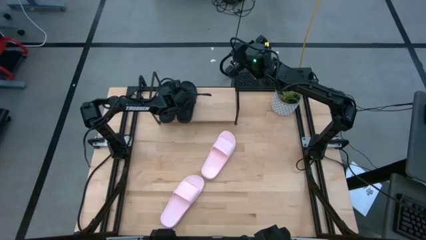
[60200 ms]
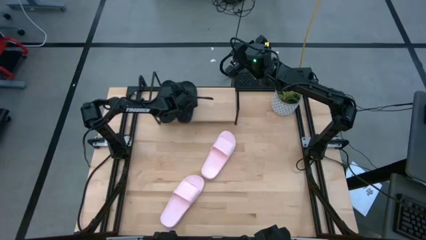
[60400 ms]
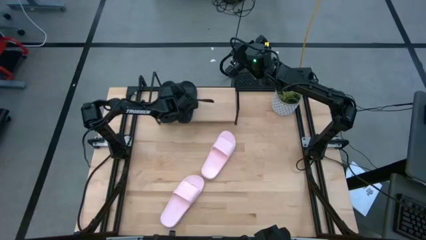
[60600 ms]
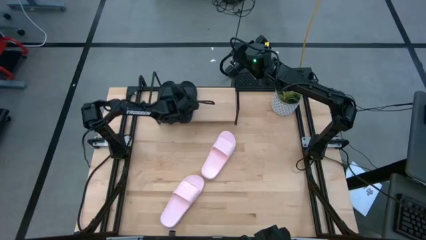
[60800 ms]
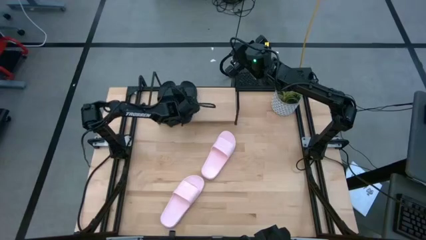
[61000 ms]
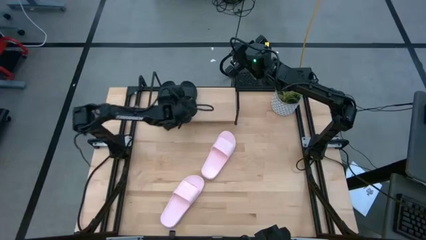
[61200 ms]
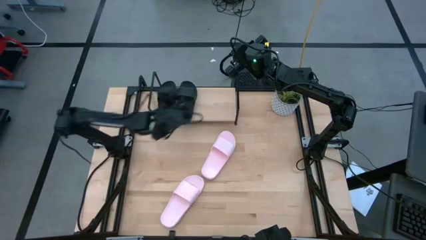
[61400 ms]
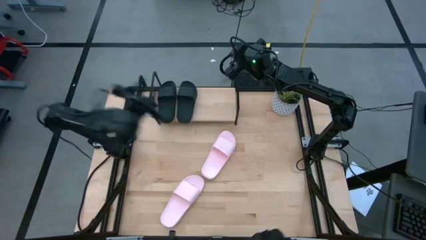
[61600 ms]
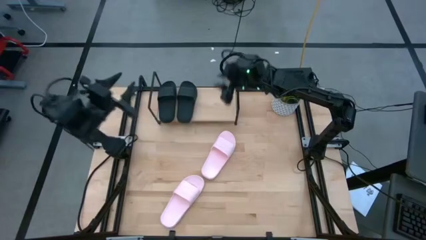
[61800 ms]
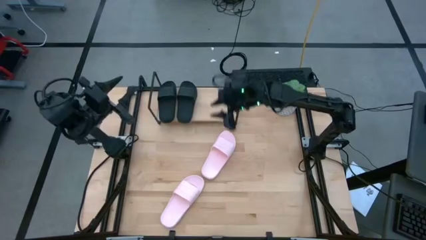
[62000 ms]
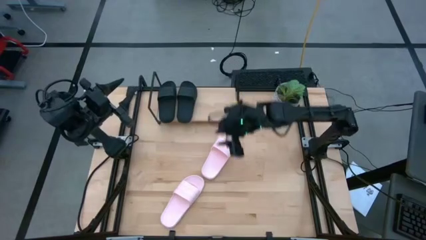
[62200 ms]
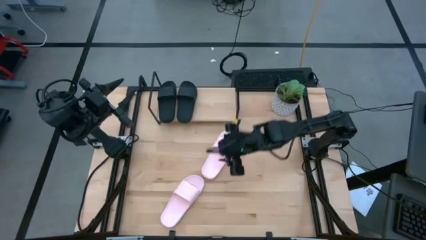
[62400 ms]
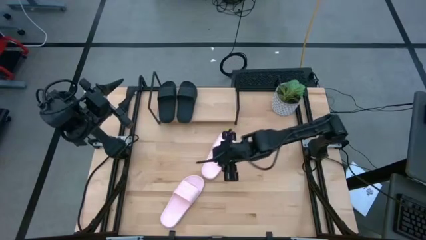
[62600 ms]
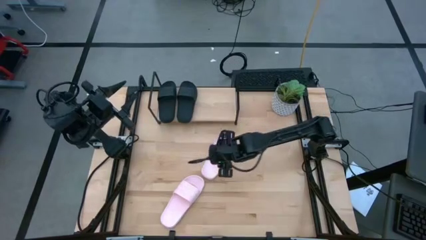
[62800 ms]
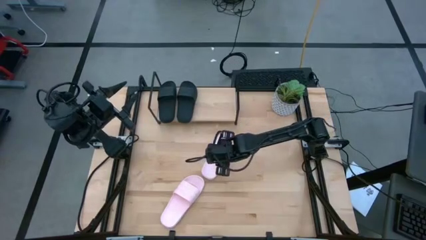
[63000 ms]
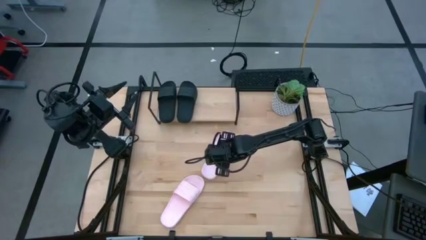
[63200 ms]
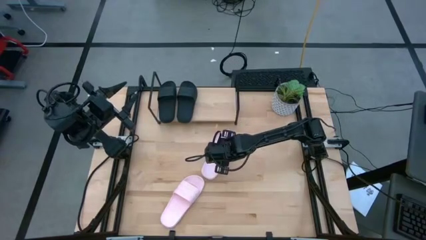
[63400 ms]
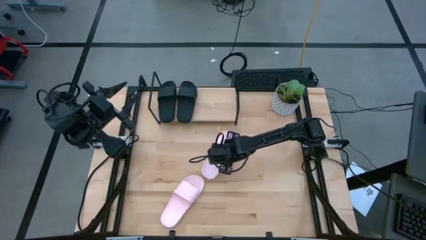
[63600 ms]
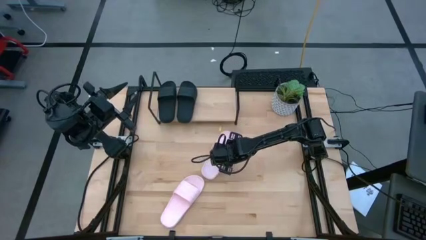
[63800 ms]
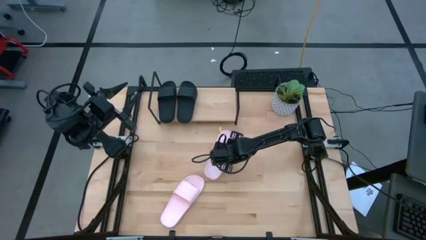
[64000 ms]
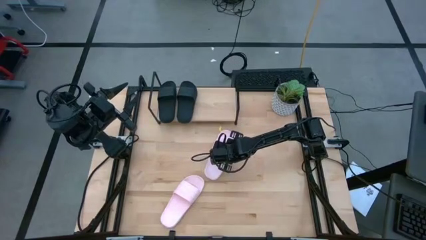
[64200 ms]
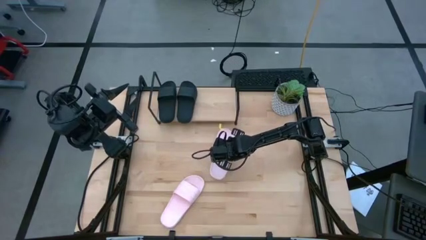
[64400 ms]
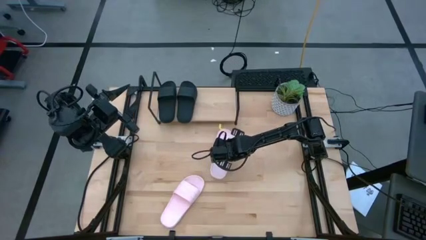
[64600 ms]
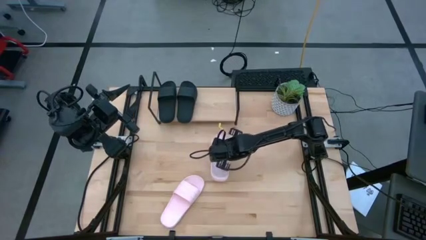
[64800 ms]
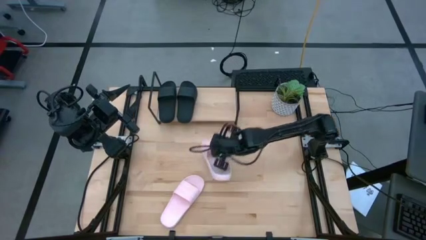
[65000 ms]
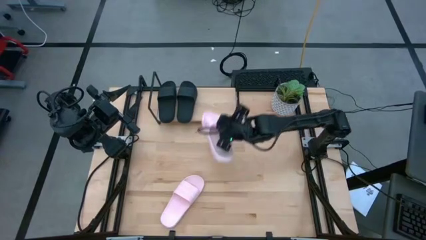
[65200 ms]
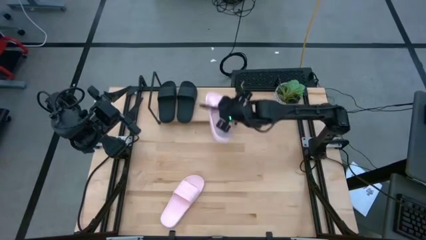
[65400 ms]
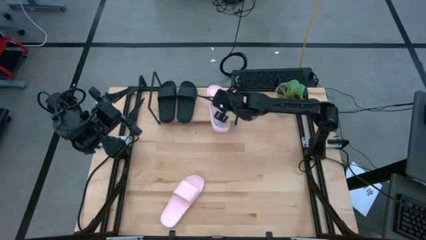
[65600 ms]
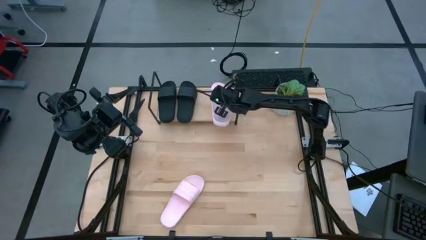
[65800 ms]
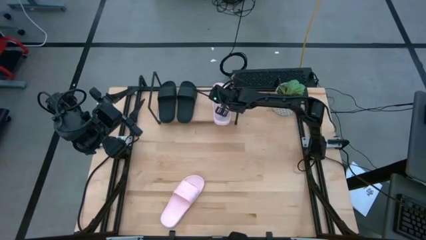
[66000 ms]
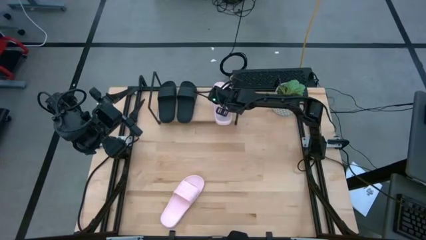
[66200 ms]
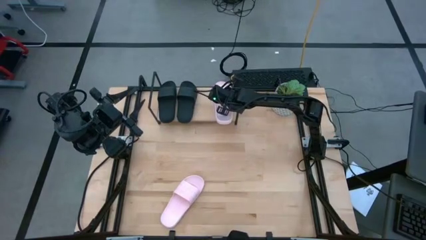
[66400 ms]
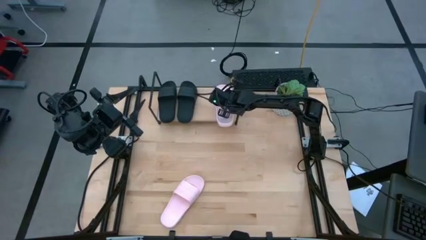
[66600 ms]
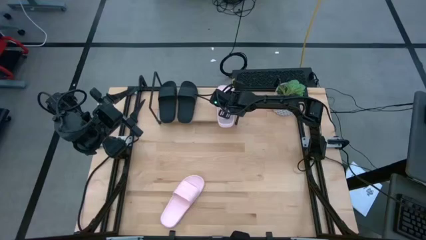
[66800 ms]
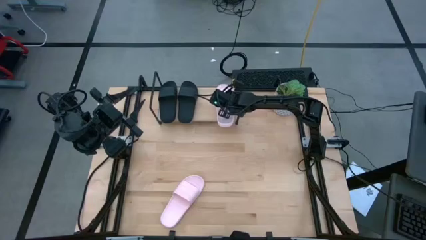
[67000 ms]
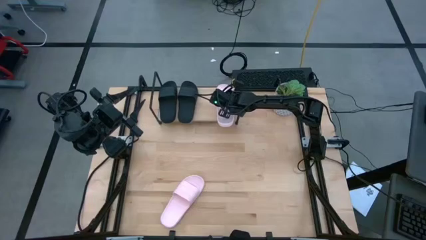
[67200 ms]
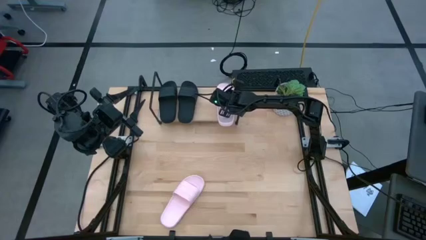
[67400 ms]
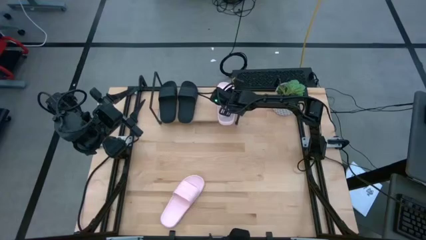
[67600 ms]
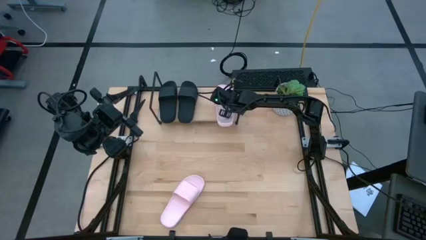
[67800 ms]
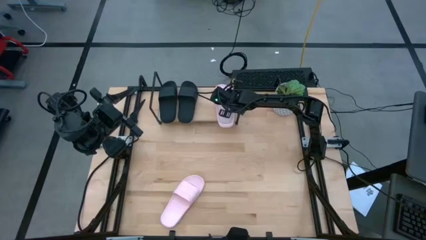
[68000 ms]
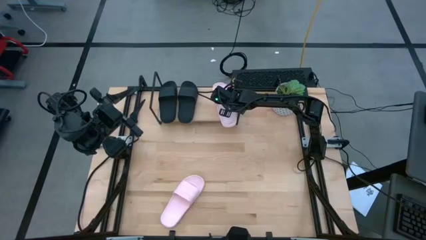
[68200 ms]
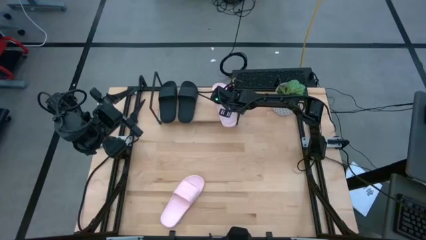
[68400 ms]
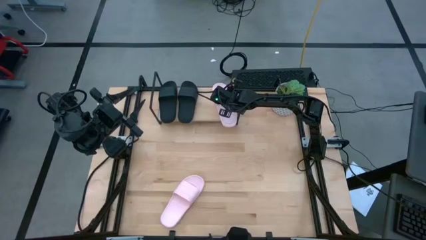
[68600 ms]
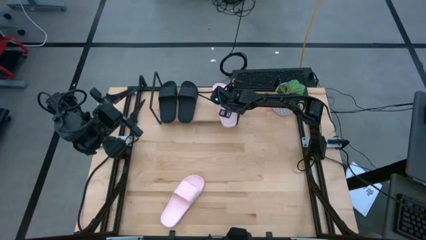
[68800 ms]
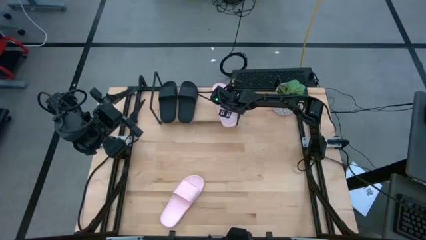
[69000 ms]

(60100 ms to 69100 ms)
Task: Pick and place slides into the shelf
Put the top pink slipper on the shelf

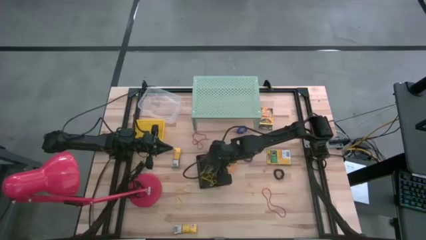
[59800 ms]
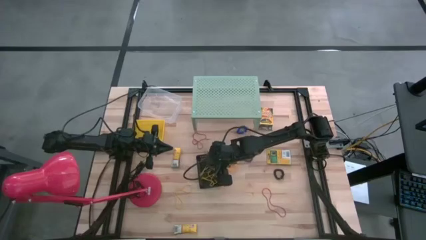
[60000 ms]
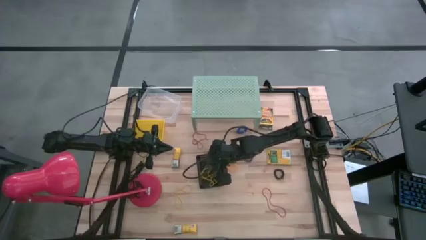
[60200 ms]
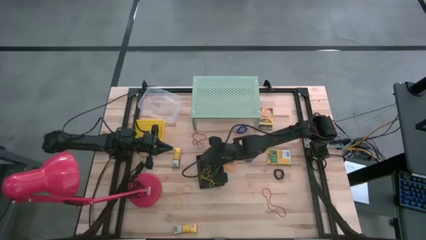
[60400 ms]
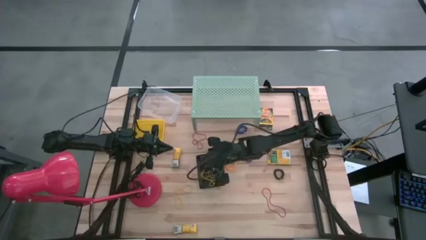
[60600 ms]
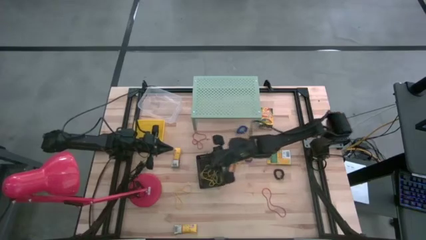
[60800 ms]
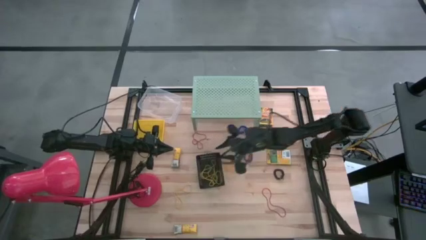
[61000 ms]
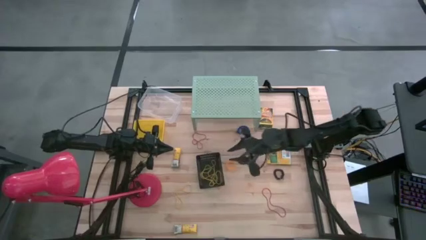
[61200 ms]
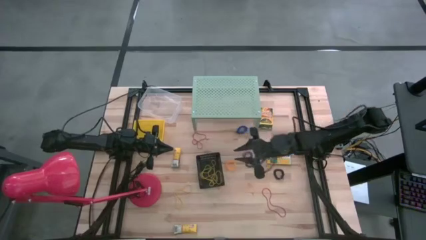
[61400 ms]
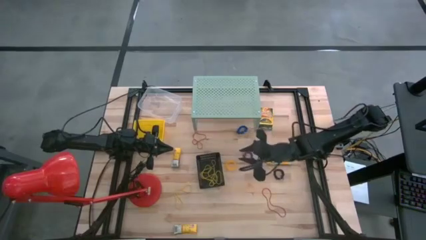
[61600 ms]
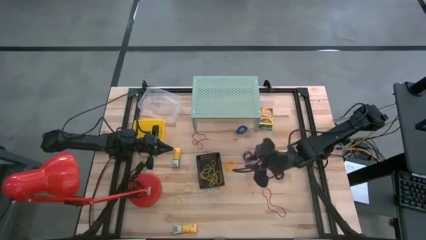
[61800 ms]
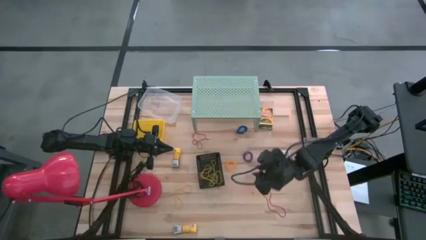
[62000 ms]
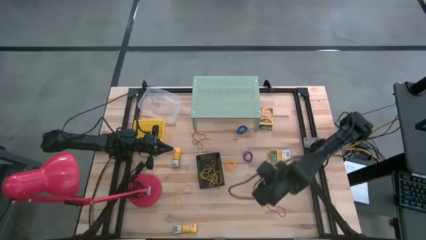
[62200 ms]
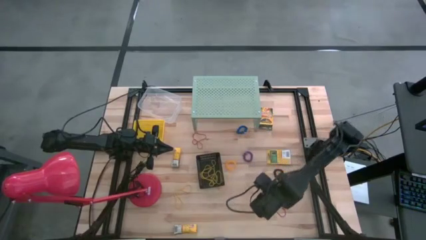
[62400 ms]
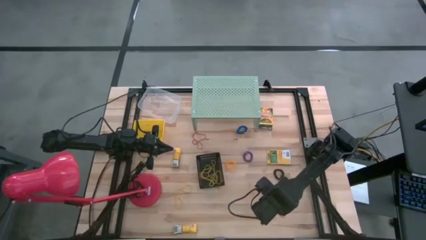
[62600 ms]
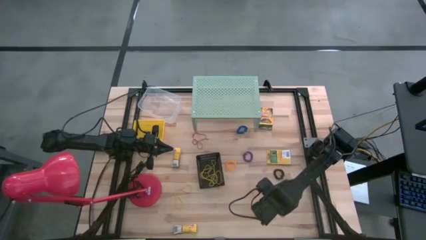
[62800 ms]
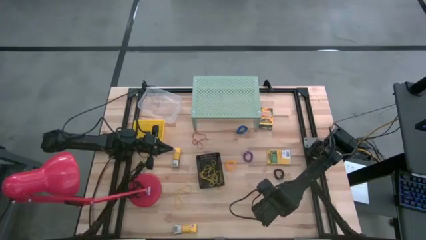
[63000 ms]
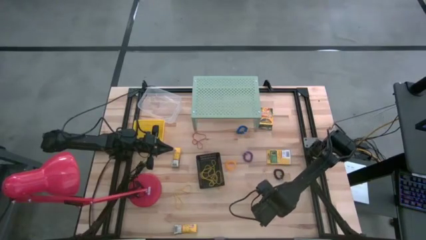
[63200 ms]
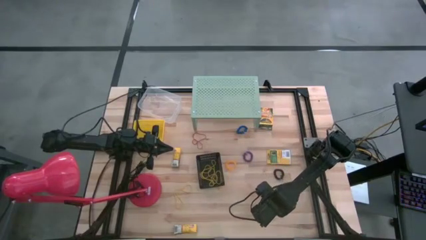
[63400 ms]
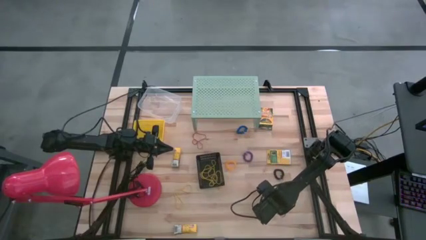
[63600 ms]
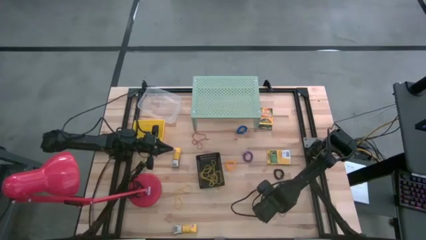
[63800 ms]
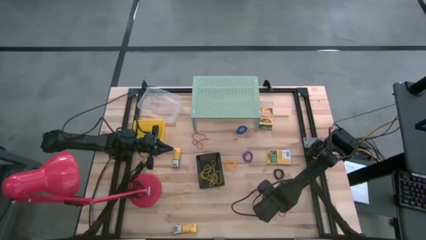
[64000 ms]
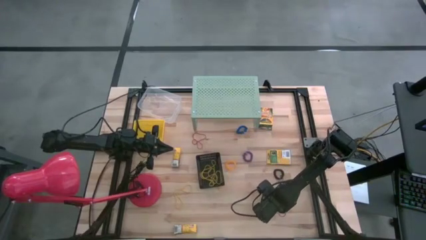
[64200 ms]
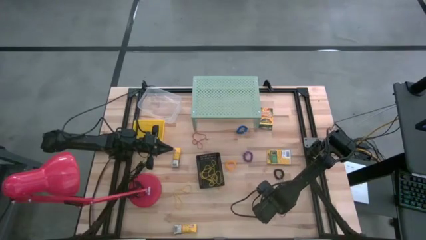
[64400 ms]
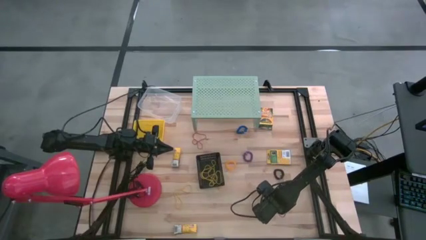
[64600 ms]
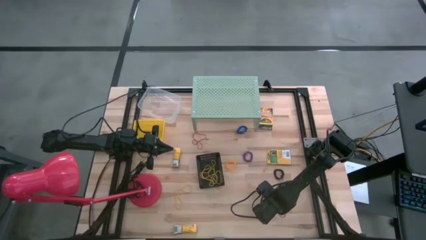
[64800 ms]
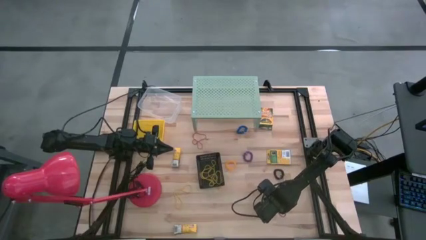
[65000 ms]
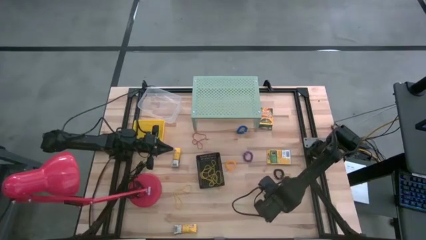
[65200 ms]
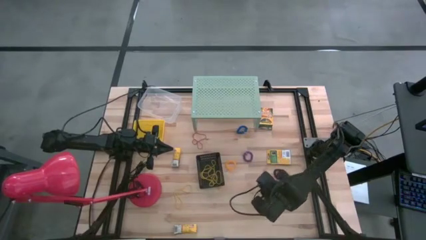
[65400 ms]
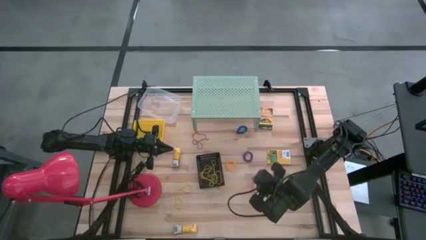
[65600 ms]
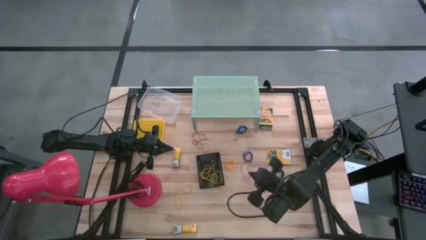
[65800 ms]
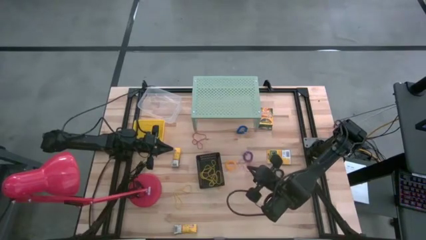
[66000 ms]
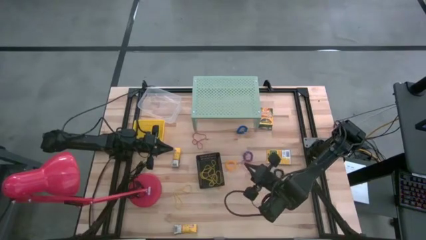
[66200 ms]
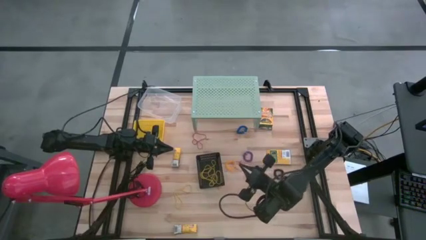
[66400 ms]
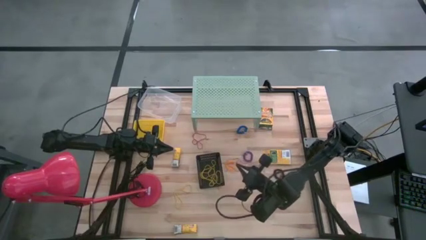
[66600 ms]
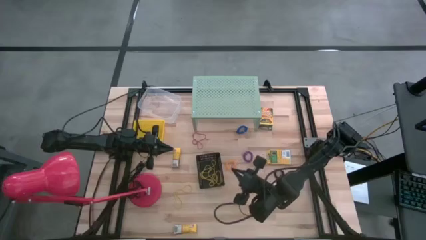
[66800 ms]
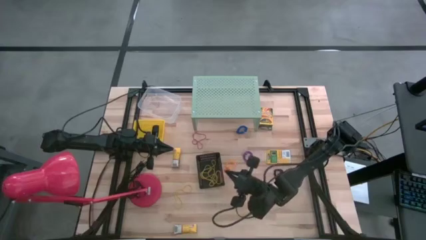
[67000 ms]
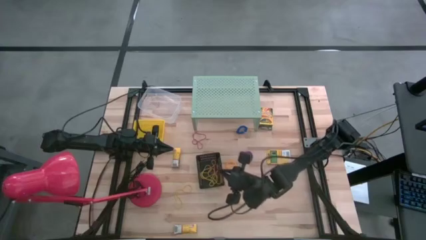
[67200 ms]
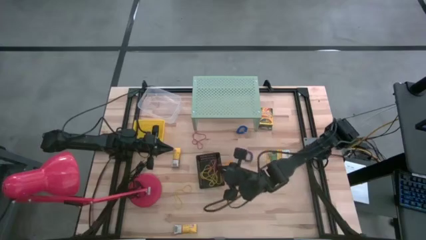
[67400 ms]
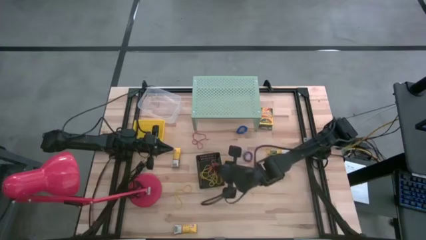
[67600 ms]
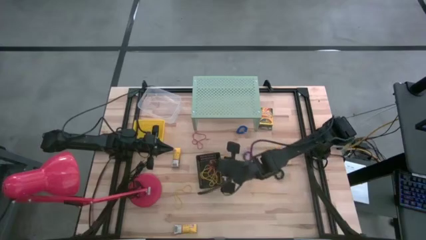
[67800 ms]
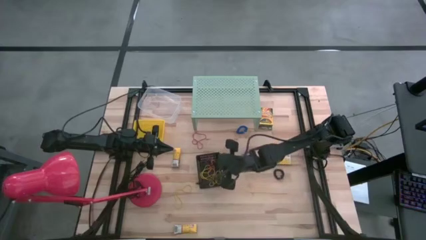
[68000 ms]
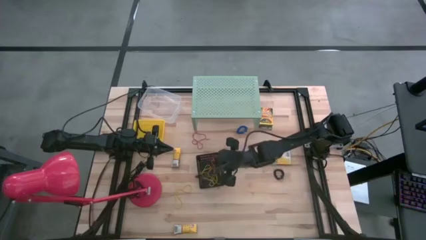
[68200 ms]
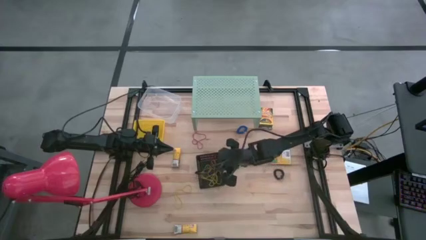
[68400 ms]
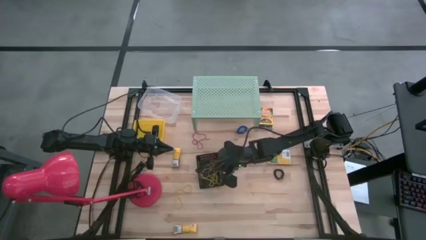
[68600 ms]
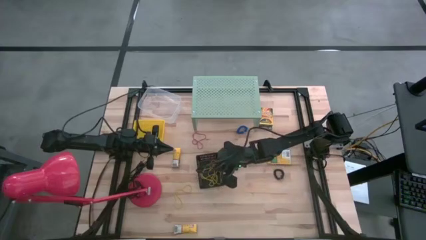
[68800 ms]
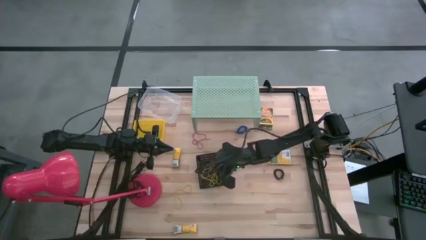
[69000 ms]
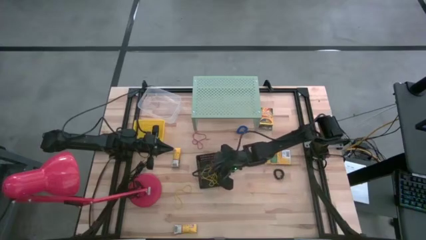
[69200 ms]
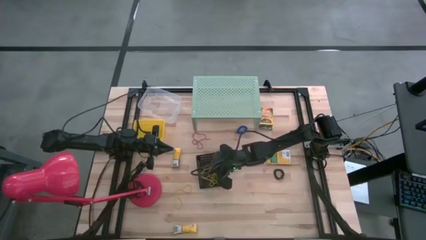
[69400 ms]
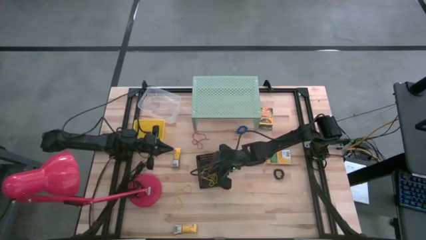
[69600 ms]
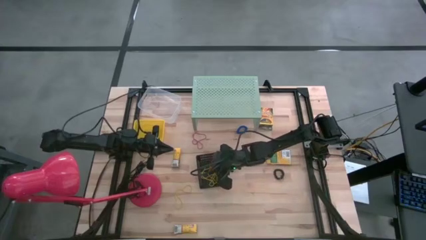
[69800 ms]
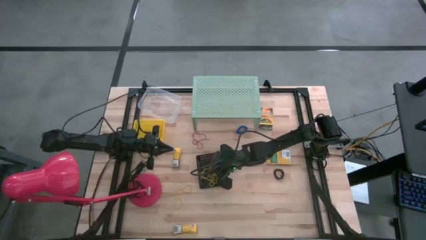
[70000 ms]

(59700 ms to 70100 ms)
Task: Pick & Place Office Desk Supplies
Put the bottom red rubber band into the black bin
